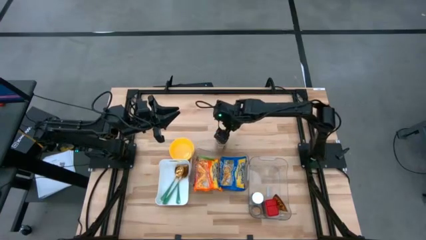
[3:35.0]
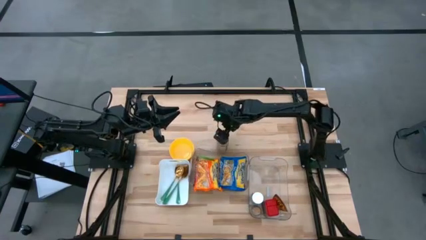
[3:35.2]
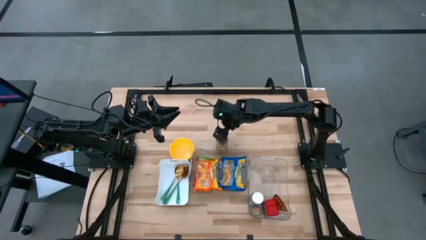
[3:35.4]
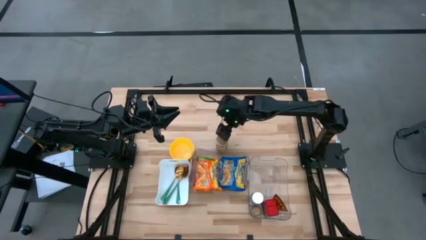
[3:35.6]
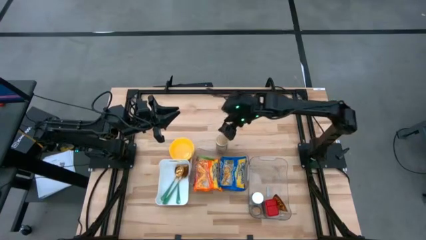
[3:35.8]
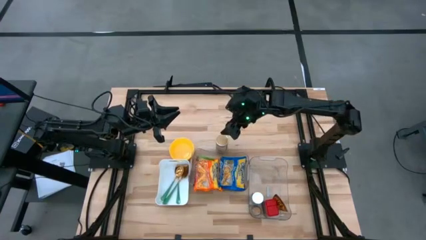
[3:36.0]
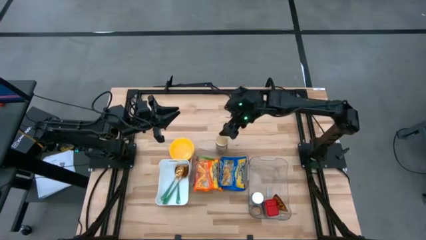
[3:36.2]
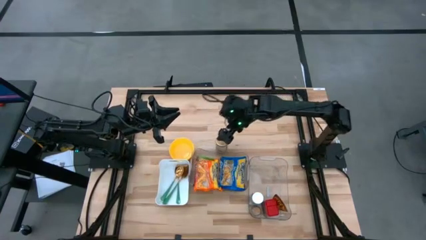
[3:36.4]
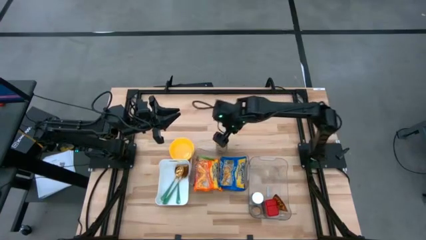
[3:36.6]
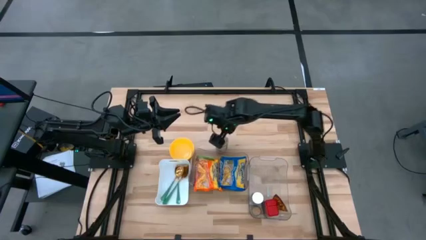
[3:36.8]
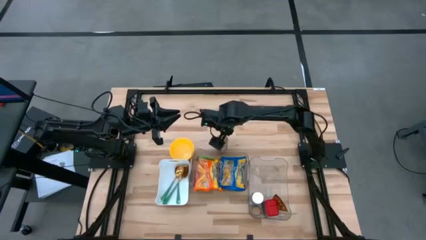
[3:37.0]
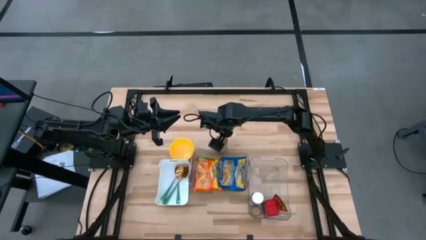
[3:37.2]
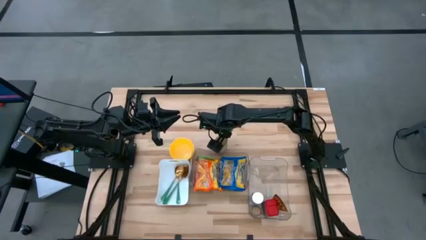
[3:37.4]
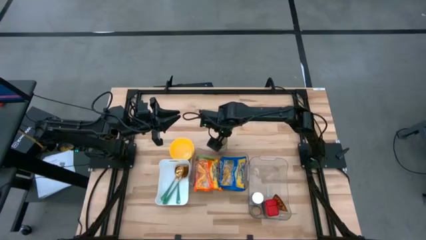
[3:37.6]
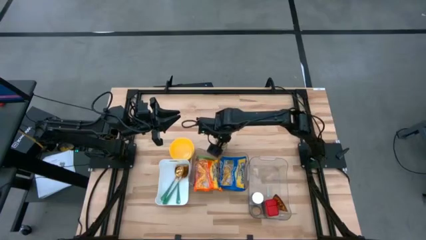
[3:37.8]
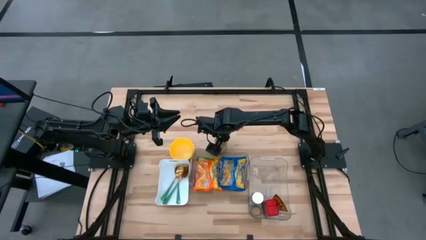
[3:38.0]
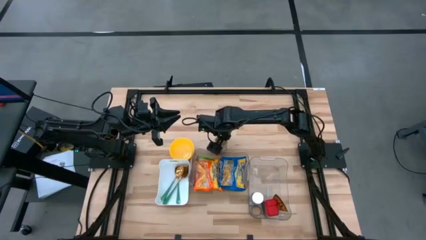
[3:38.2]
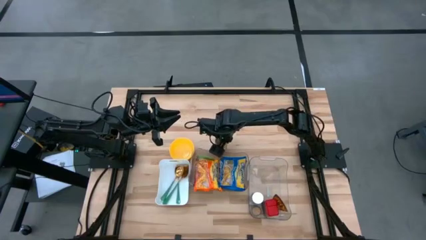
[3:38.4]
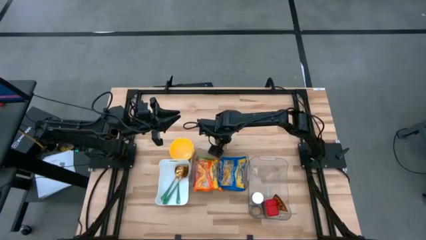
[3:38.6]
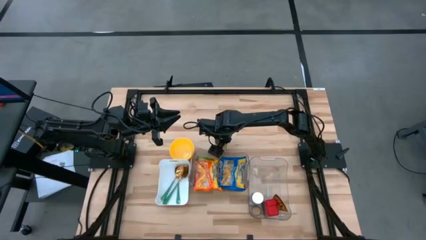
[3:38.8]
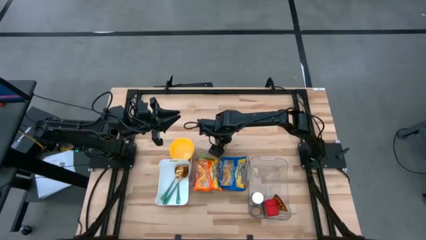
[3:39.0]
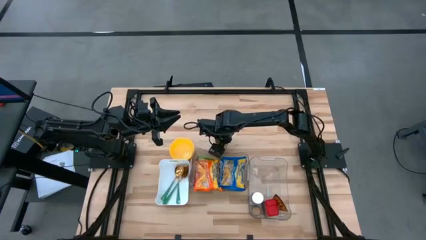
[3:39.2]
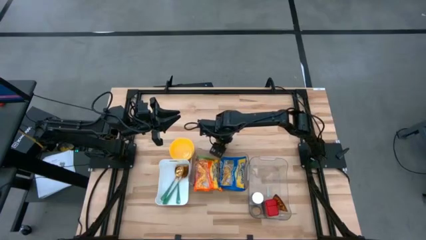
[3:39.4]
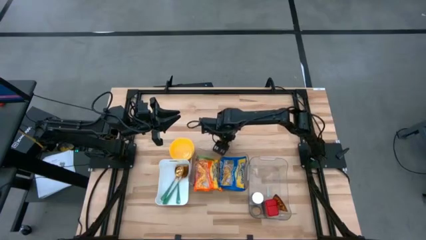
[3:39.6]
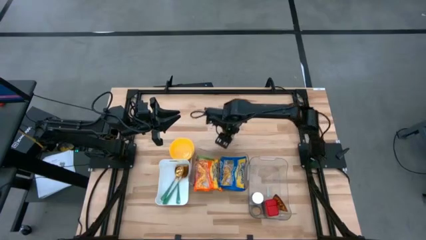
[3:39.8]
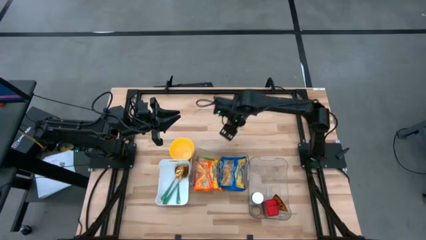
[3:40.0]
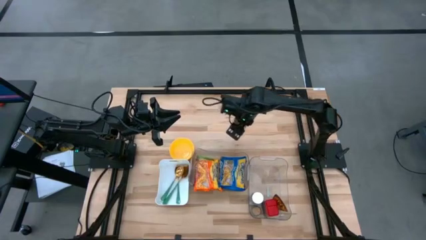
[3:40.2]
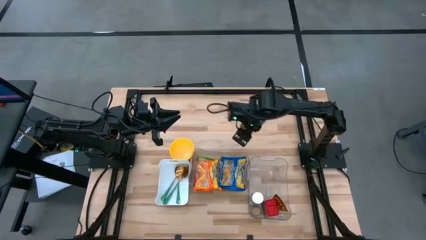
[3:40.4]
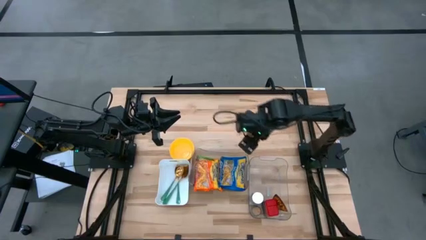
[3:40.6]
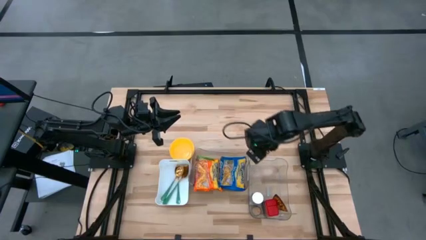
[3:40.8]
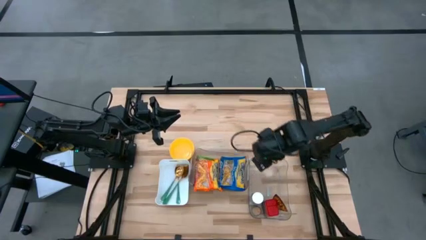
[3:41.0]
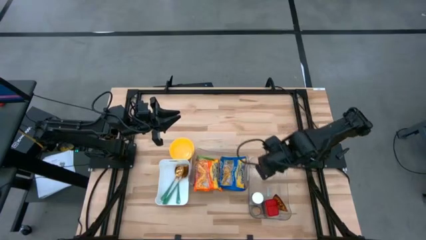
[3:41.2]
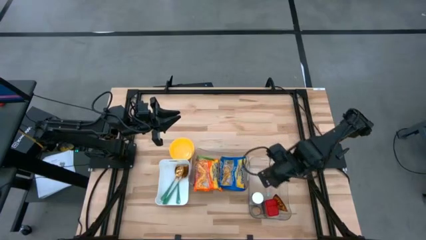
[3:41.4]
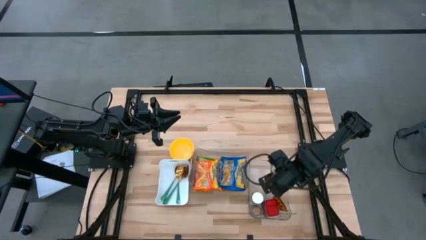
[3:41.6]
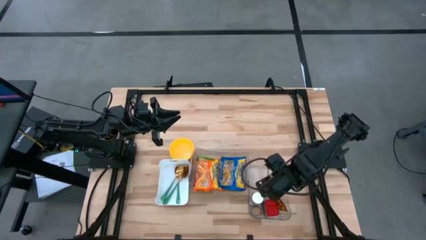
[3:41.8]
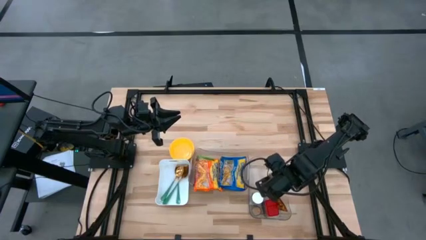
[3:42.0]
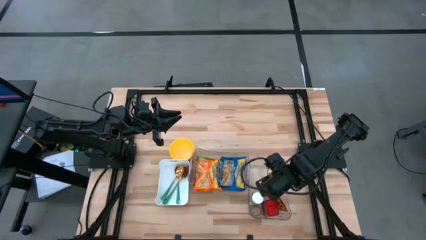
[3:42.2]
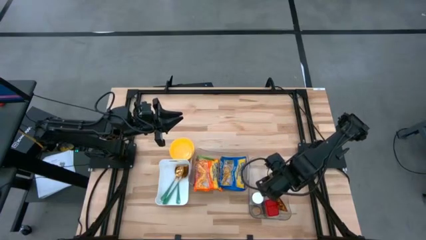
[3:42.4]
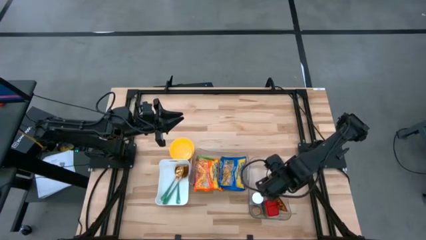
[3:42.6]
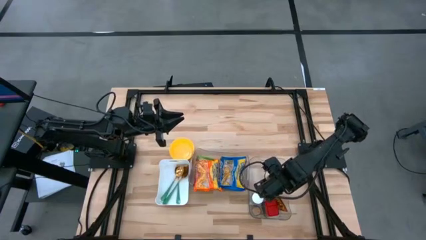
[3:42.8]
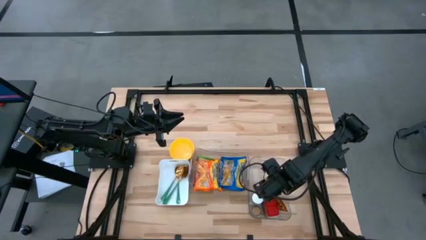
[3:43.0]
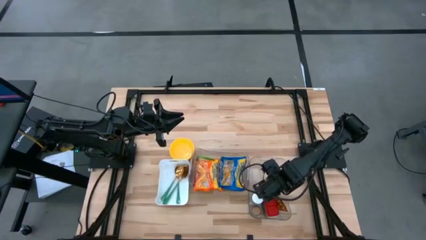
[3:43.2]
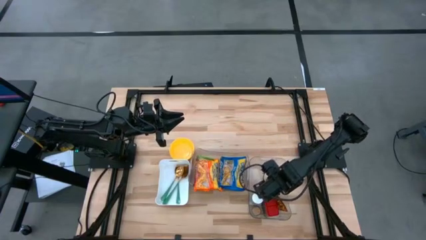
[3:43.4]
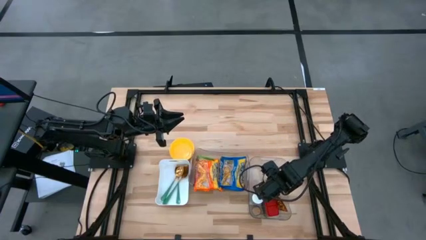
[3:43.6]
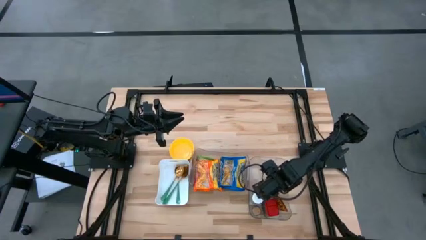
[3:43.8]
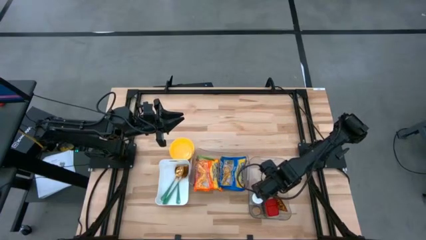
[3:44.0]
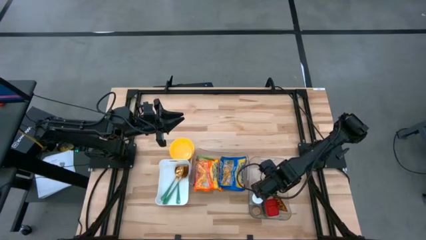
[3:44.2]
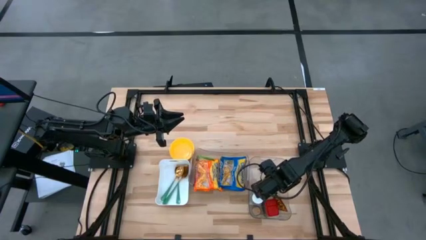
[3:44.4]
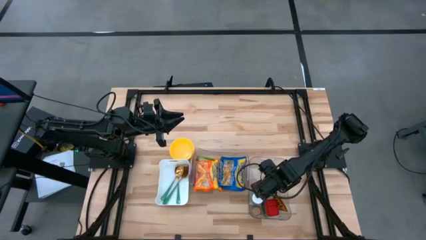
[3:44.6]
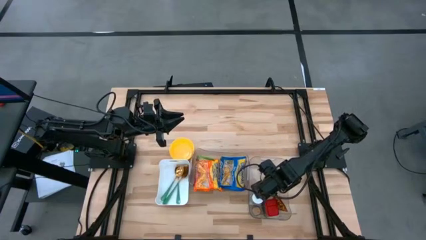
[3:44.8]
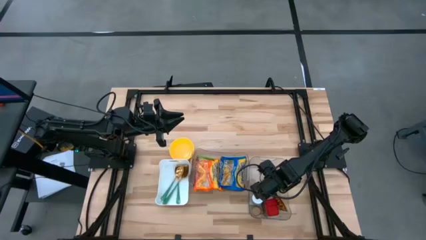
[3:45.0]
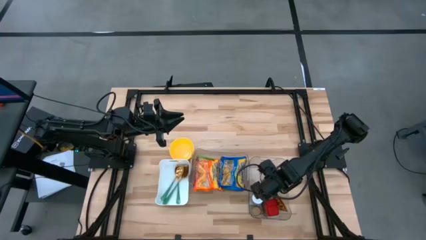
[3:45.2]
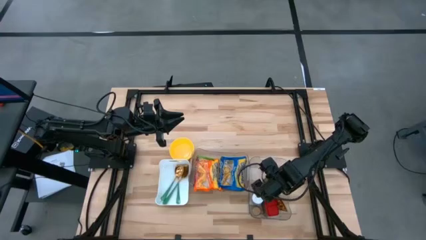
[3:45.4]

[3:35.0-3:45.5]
Task: Pick & Place Food Item
Put the golden seasoning bottle into the right transparent bin

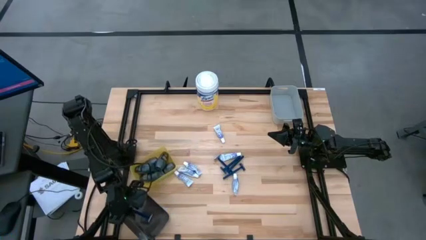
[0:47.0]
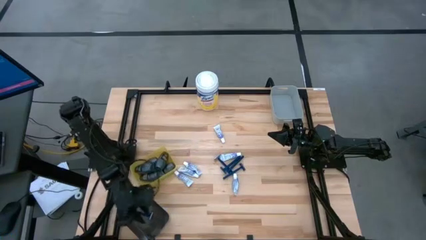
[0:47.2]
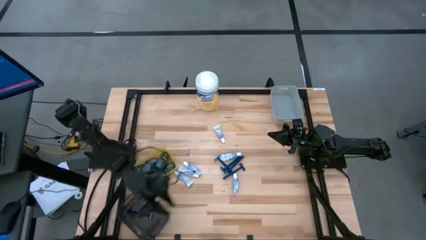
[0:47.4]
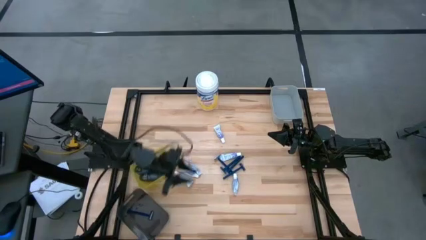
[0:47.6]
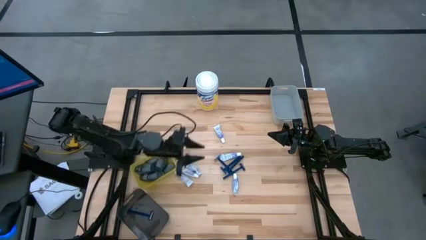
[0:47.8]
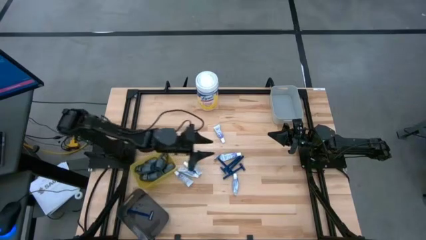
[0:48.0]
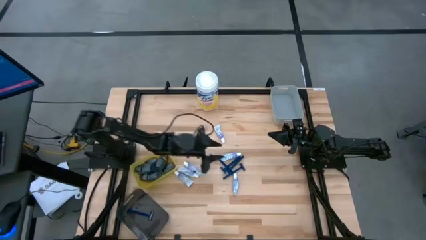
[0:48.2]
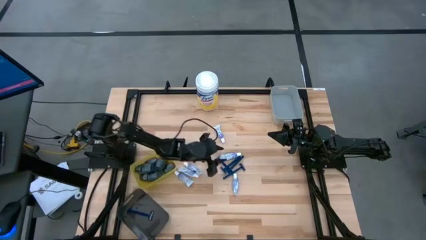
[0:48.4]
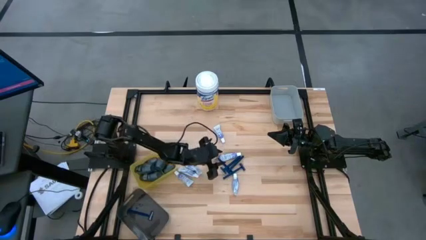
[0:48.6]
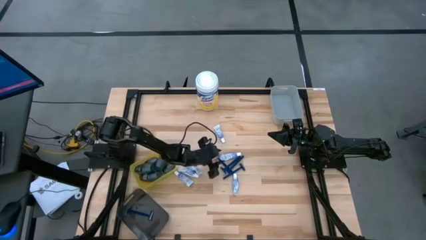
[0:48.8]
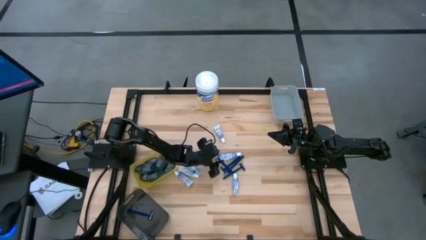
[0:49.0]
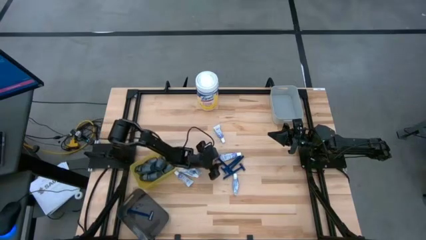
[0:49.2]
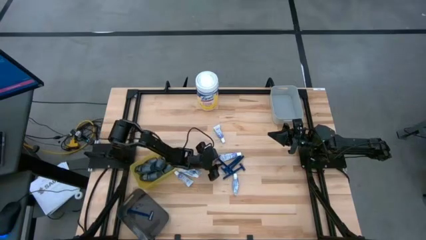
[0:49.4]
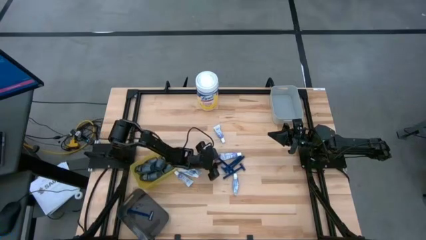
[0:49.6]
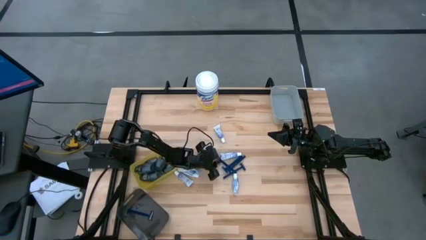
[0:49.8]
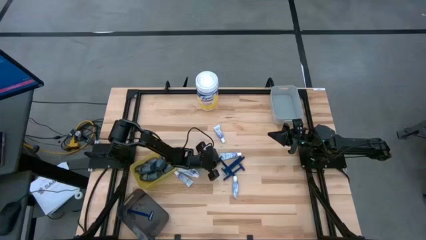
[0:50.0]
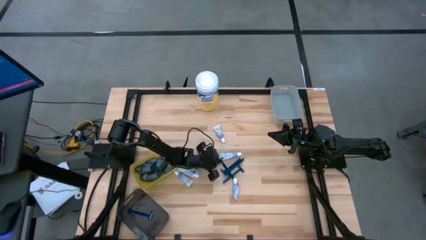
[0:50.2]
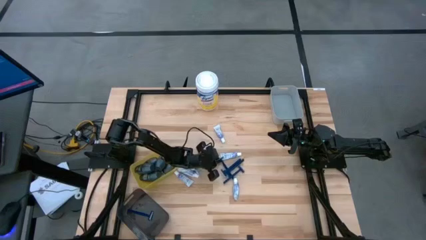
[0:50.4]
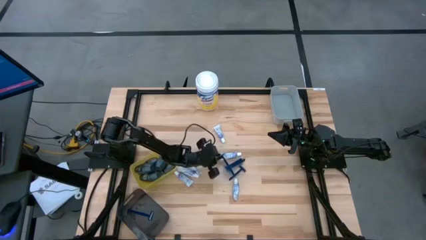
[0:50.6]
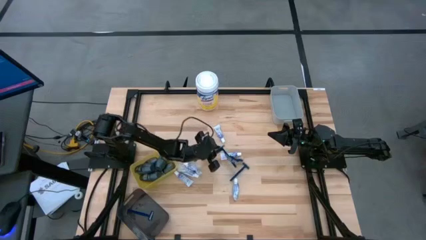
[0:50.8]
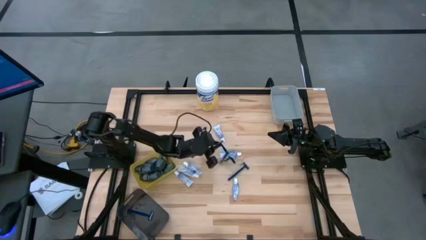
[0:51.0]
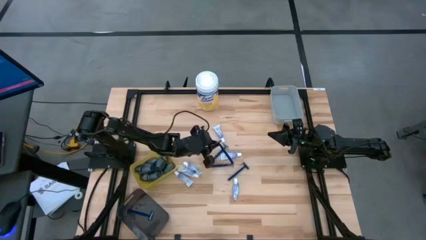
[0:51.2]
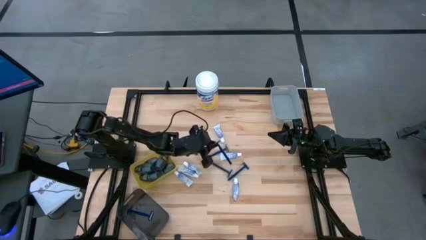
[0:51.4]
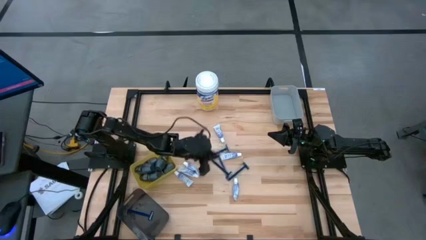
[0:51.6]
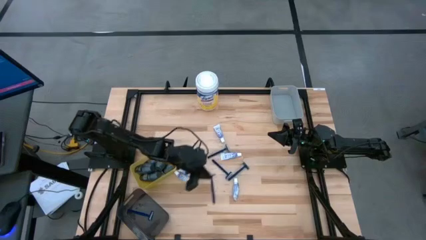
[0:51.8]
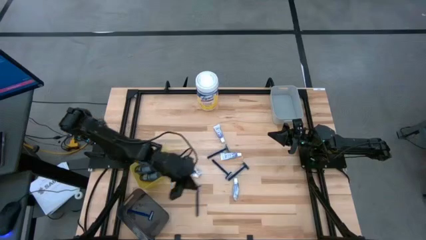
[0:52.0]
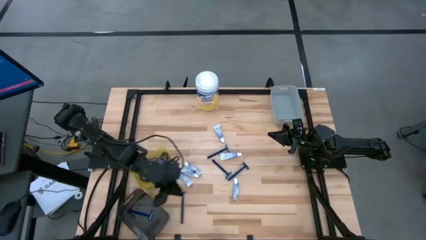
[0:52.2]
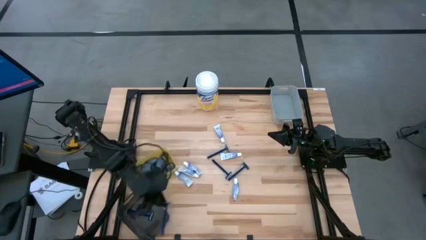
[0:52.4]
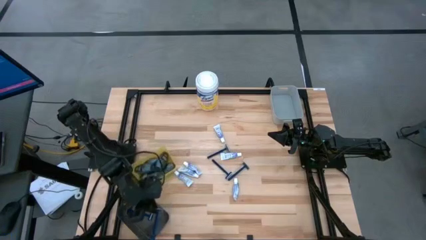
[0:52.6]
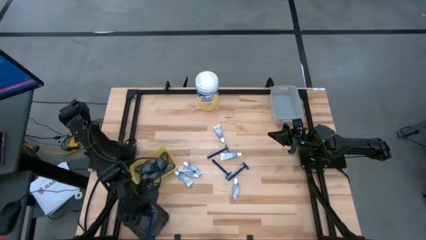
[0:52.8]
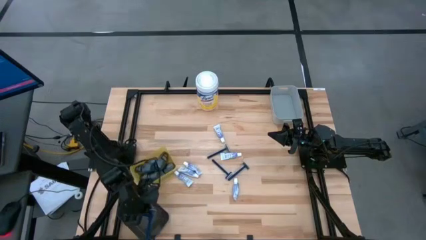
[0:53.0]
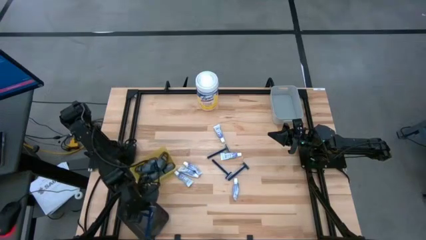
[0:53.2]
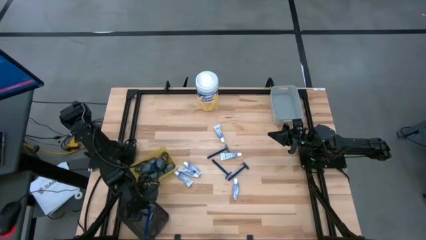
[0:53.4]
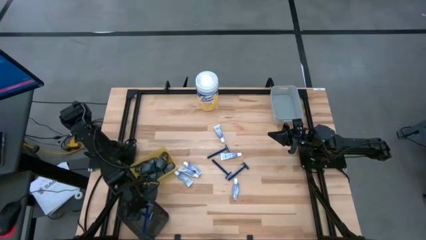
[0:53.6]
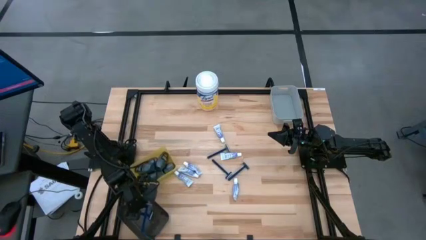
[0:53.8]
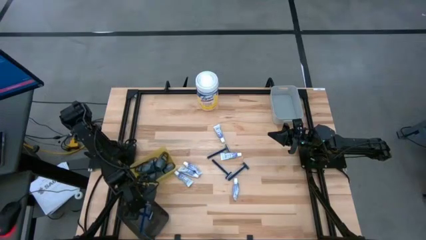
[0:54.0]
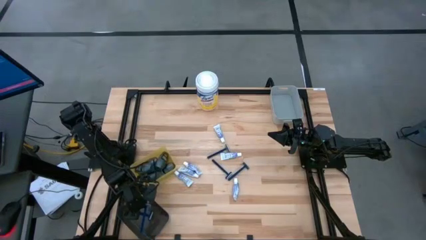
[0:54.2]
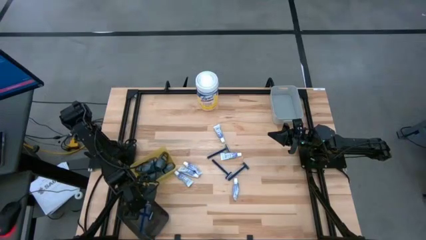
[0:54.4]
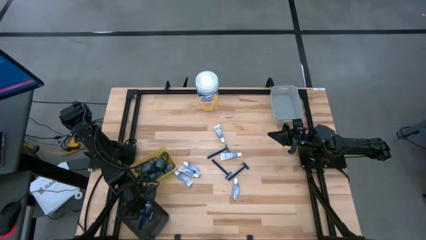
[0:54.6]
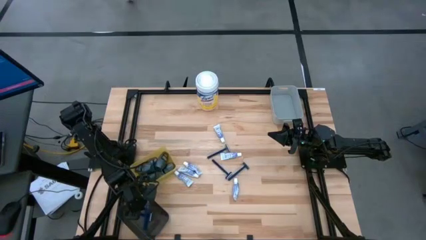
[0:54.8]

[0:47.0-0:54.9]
Task: Pick & Place Travel size toiletries
Put the dark blue razor into the black bin
